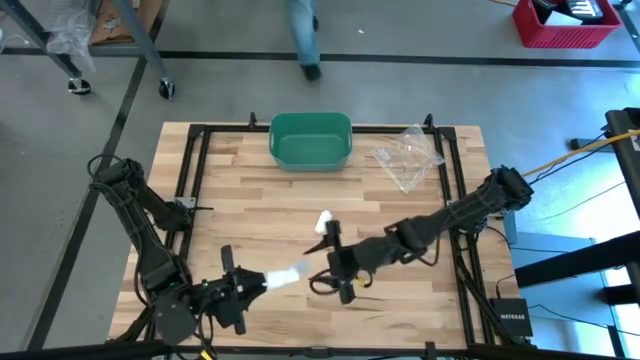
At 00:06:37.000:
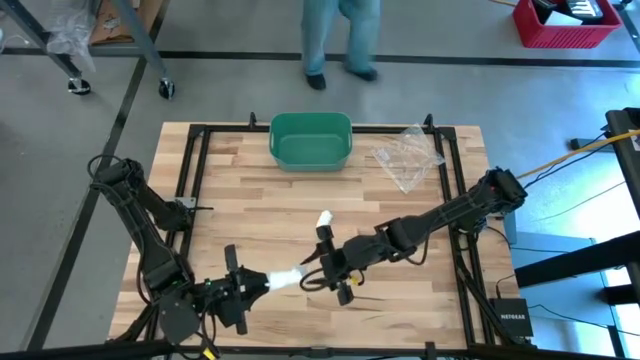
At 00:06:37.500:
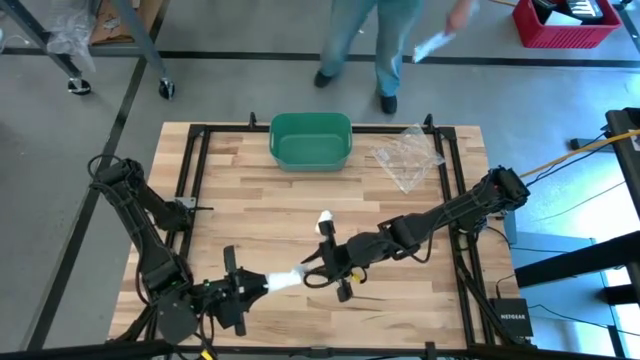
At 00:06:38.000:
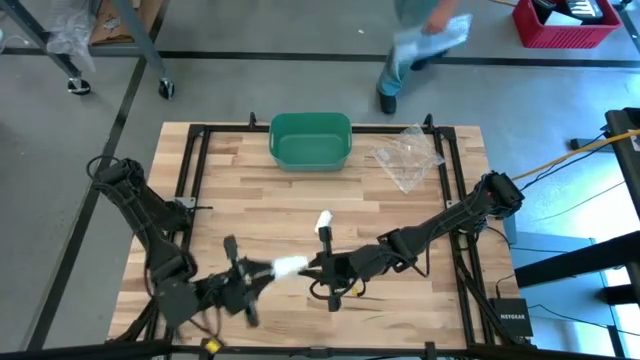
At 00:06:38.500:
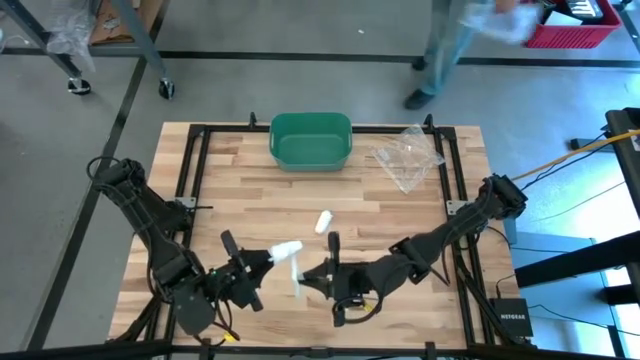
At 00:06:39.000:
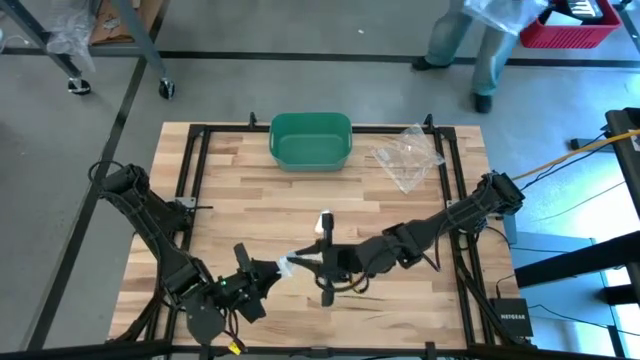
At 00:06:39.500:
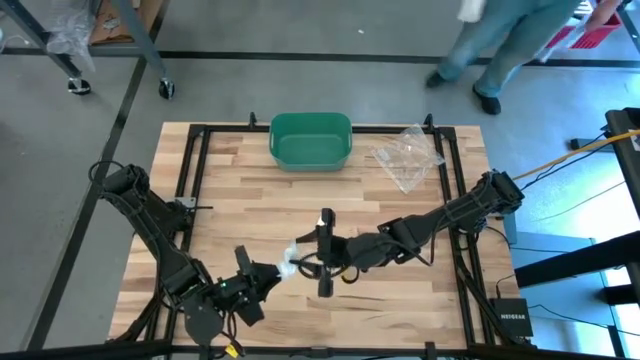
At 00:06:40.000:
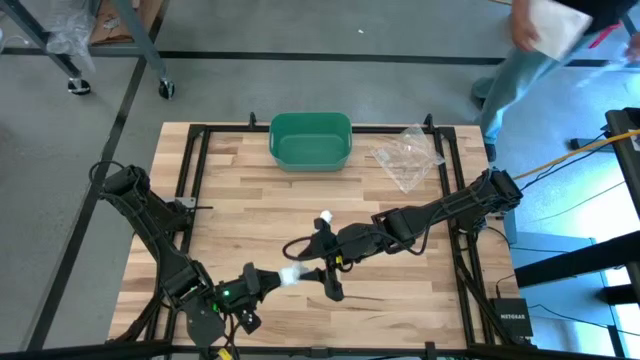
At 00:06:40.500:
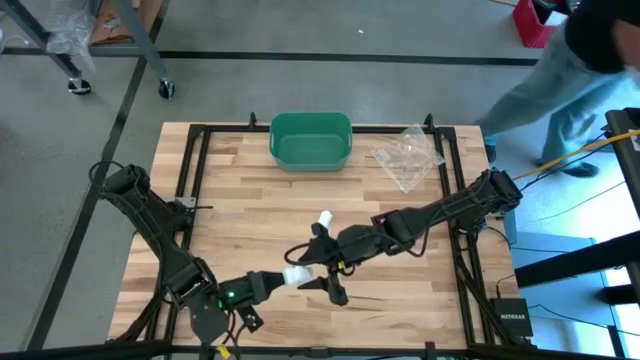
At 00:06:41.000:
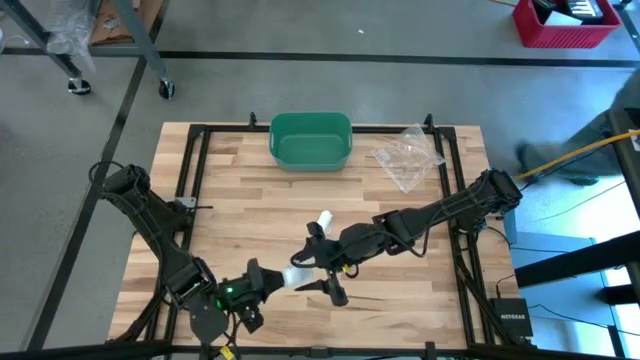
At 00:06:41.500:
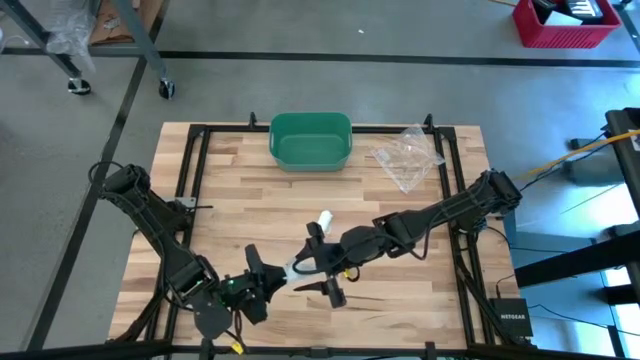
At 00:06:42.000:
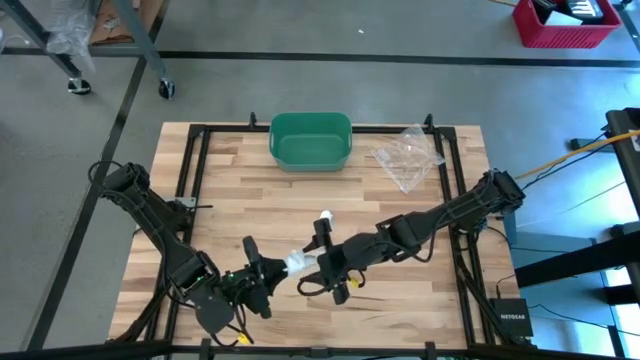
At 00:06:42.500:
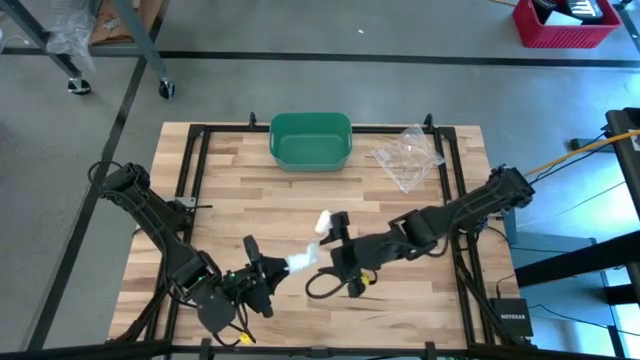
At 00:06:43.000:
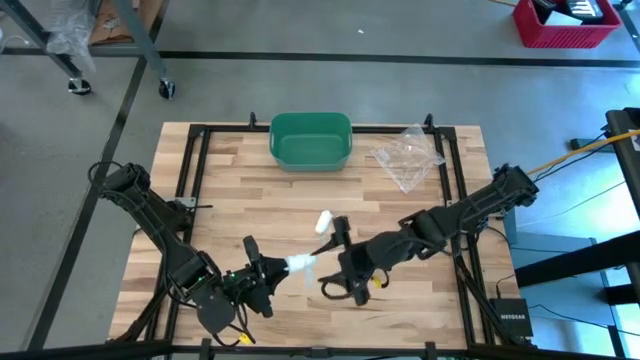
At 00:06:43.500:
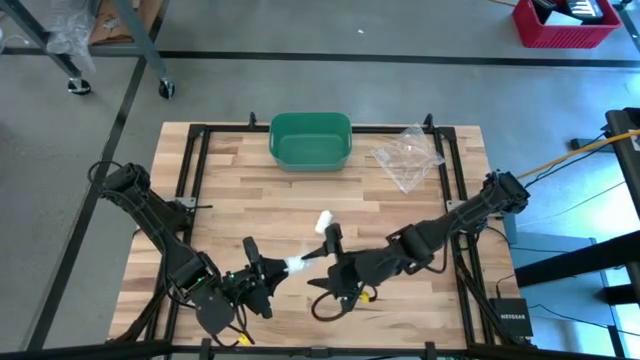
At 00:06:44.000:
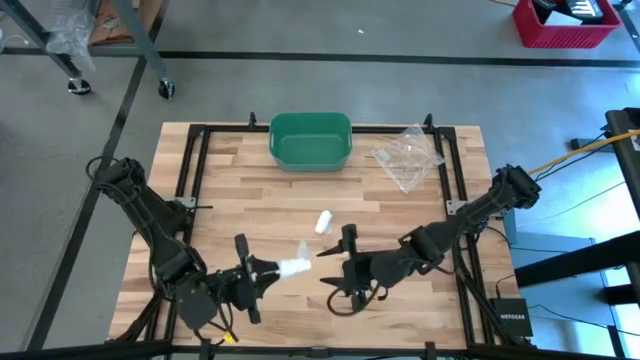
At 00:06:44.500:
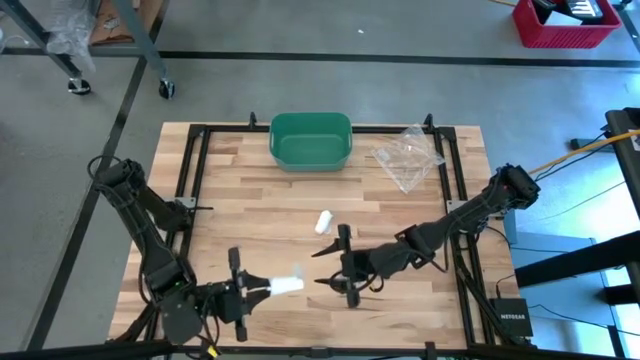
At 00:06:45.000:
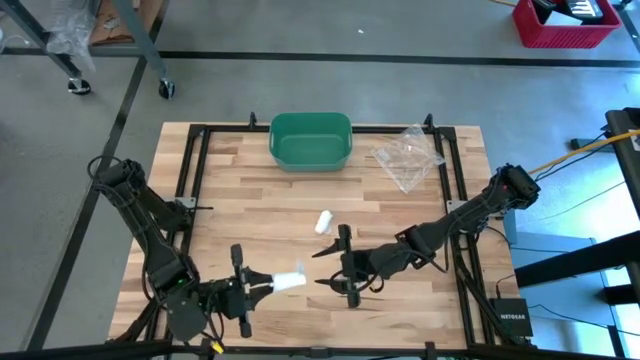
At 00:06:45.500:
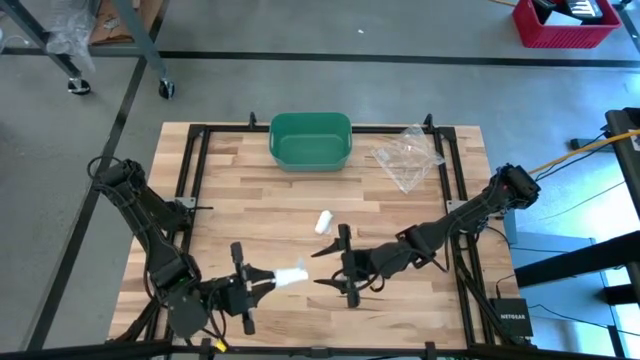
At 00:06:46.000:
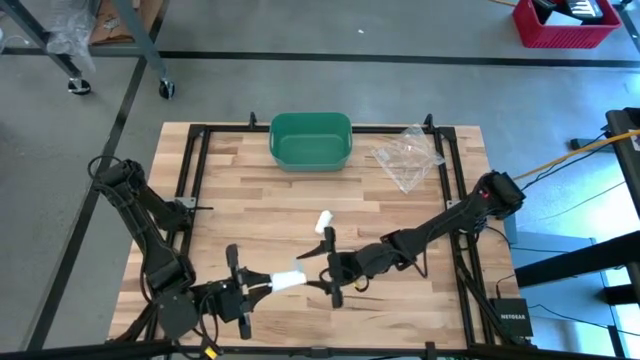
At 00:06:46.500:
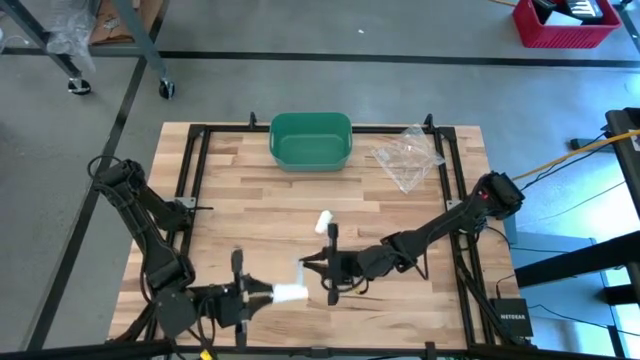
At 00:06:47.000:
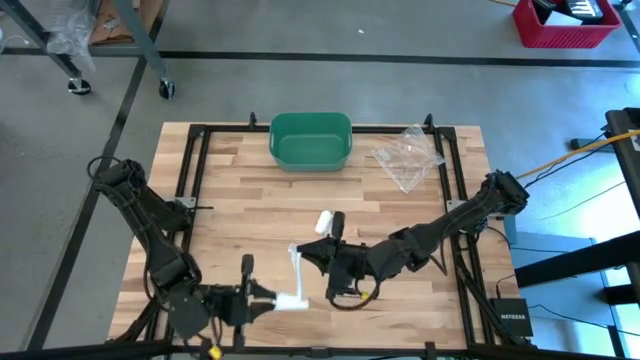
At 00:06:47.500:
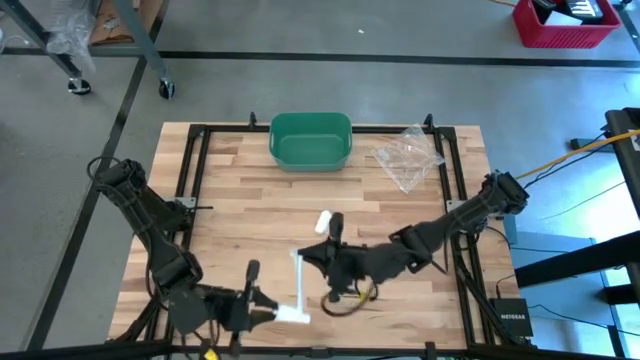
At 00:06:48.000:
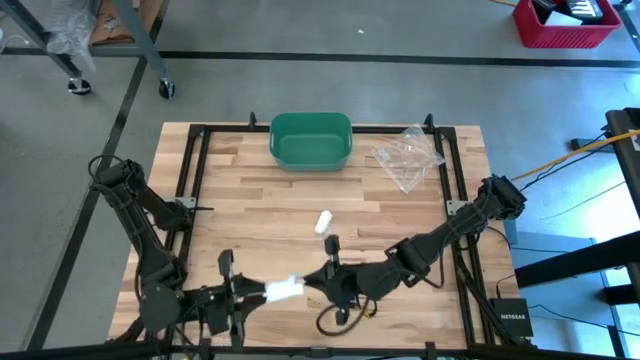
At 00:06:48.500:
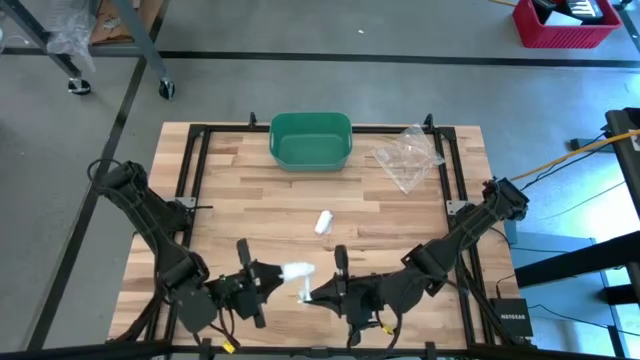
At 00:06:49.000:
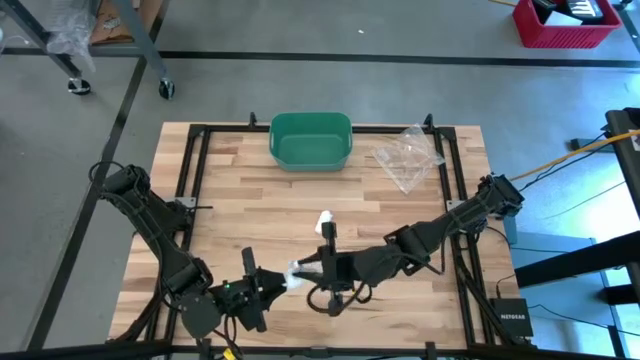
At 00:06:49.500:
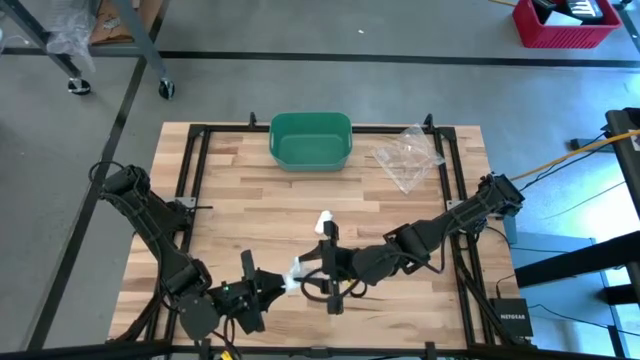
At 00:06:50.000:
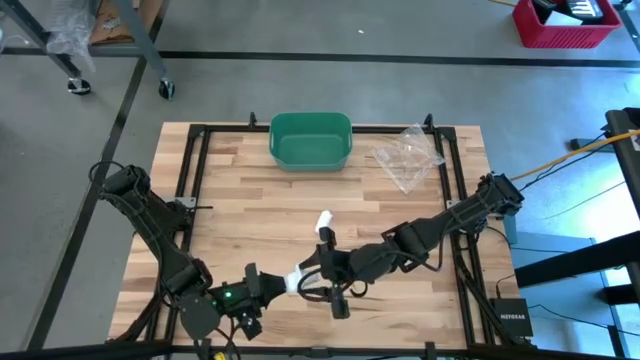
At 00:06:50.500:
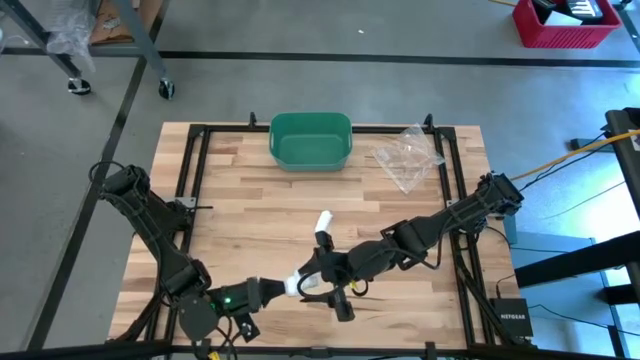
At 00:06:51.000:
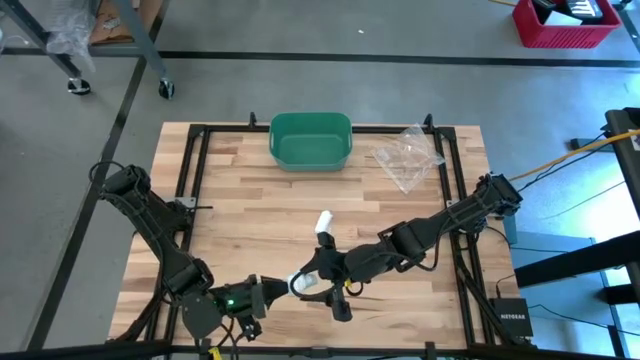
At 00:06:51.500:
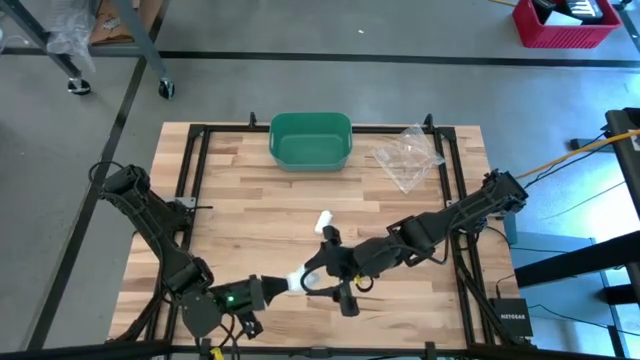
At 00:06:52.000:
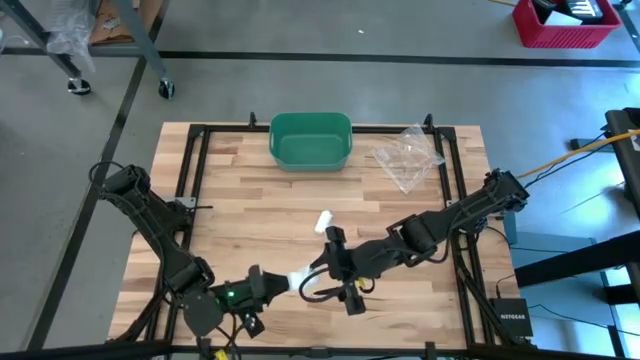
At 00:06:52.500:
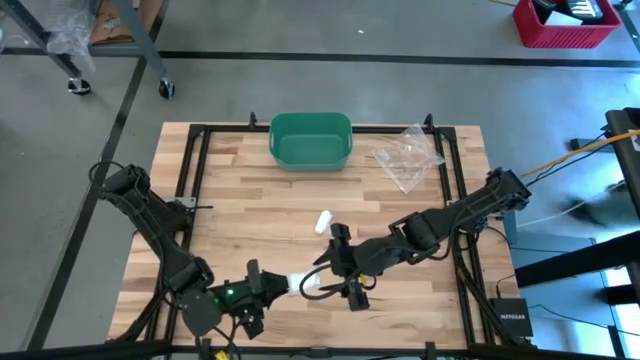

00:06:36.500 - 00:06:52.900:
Task: Roll bandage
Roll the bottom white bandage

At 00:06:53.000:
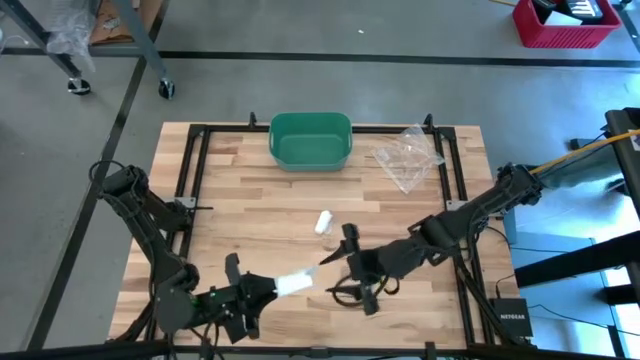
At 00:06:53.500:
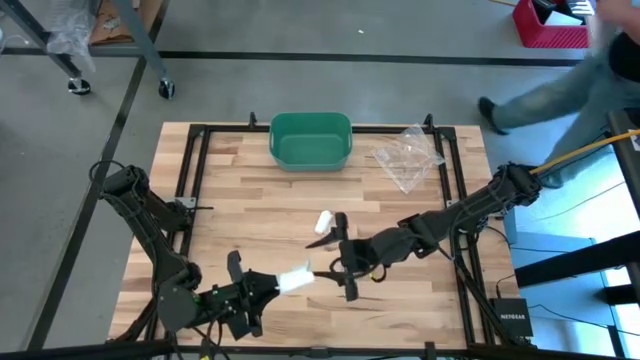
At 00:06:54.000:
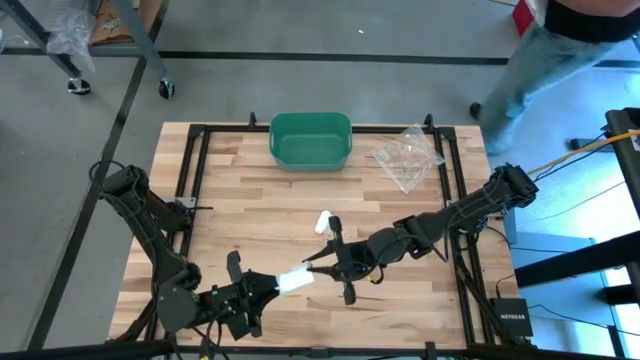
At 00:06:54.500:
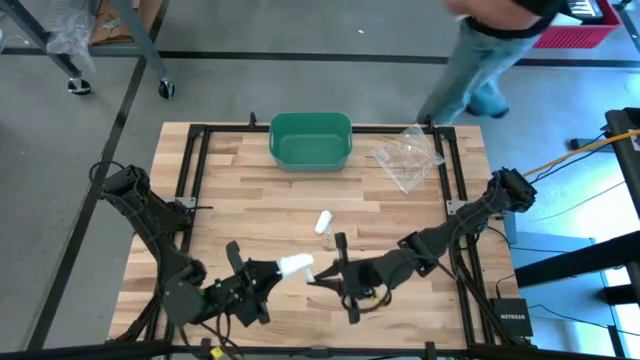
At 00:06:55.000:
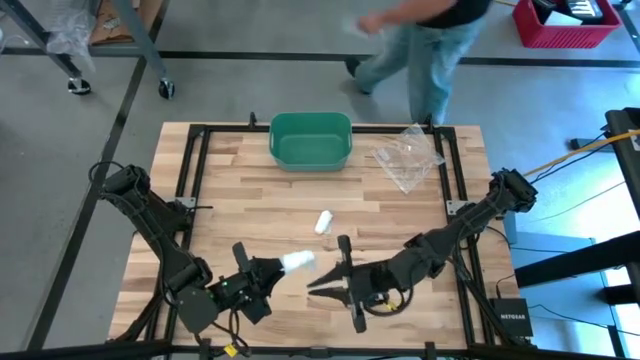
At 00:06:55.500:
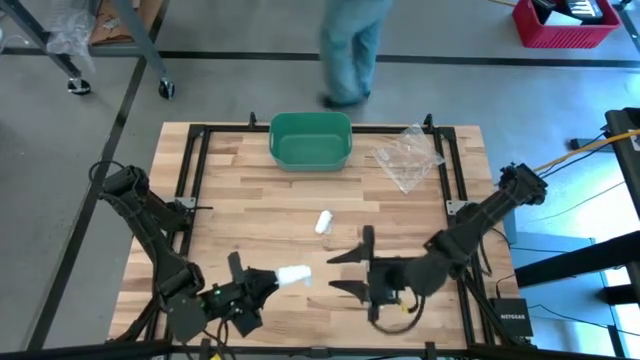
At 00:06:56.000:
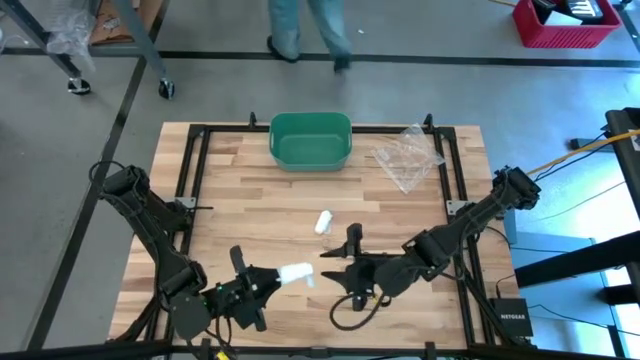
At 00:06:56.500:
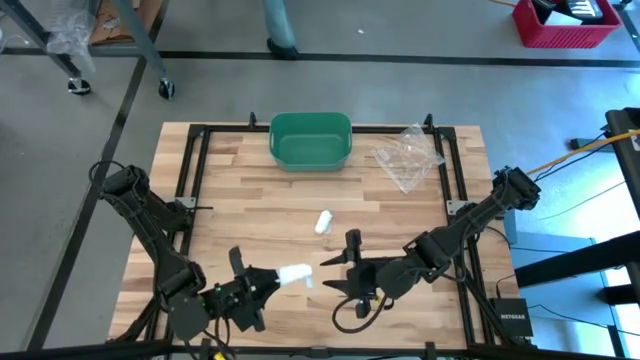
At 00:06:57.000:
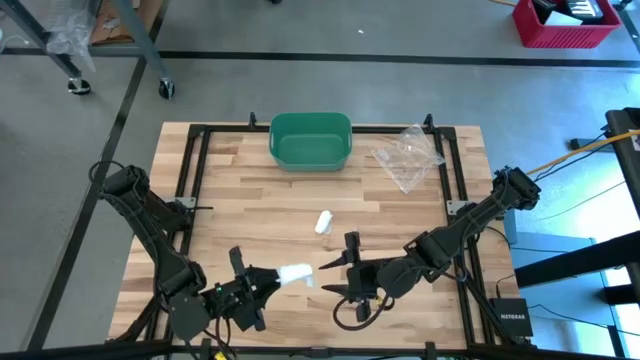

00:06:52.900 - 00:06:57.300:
Roll the bottom white bandage
